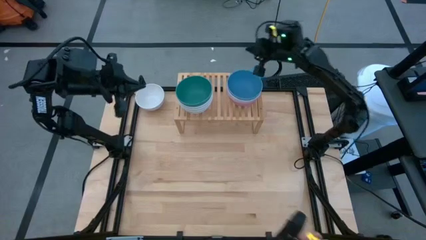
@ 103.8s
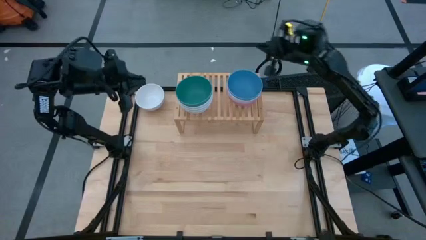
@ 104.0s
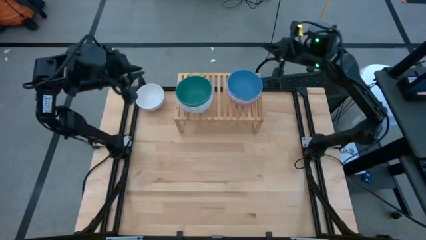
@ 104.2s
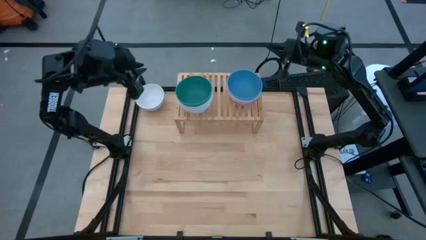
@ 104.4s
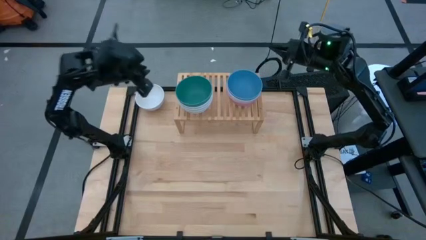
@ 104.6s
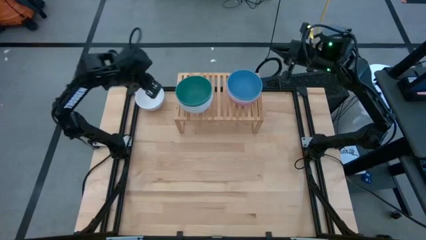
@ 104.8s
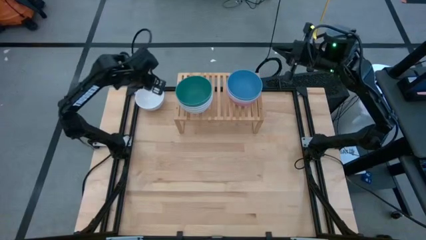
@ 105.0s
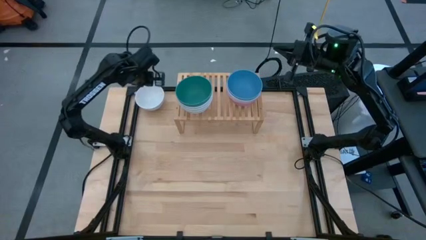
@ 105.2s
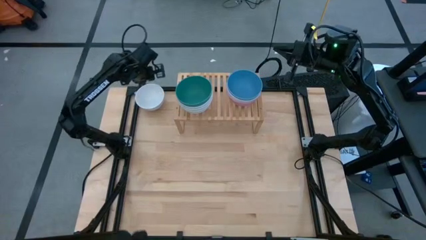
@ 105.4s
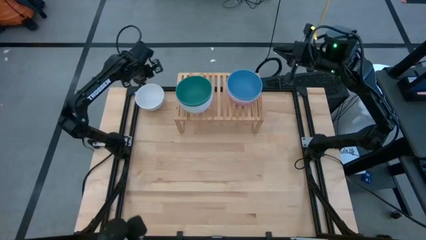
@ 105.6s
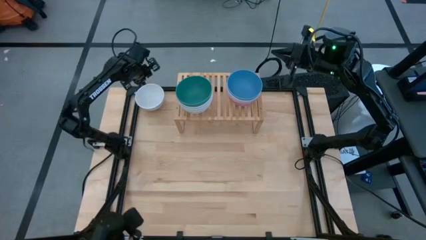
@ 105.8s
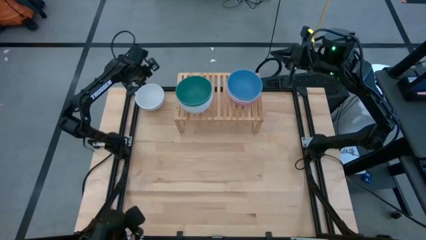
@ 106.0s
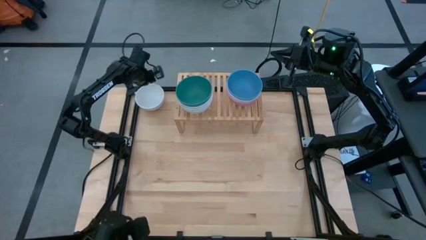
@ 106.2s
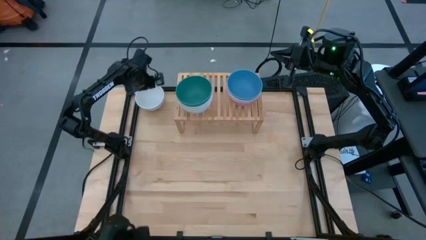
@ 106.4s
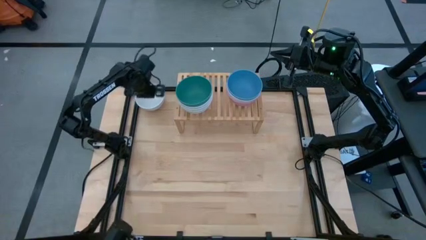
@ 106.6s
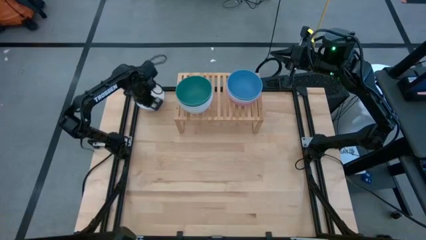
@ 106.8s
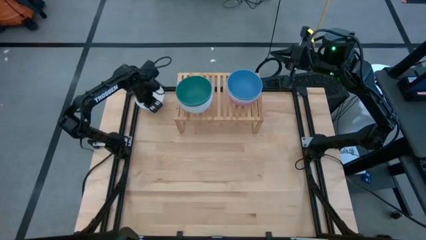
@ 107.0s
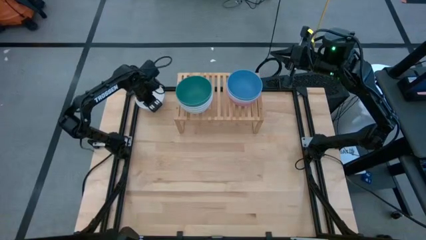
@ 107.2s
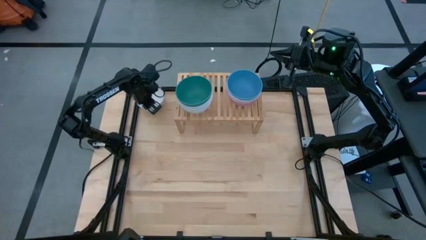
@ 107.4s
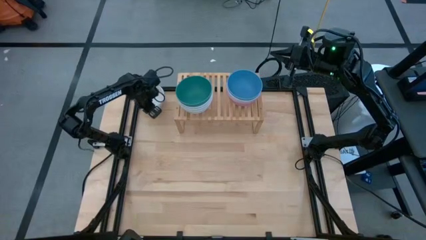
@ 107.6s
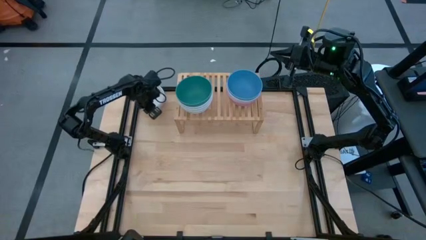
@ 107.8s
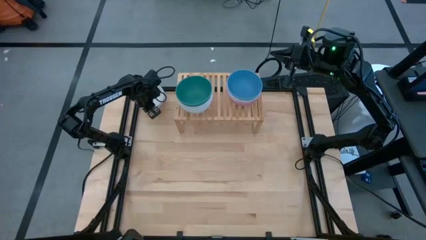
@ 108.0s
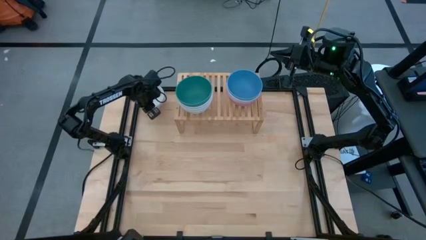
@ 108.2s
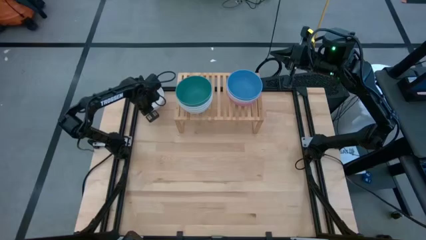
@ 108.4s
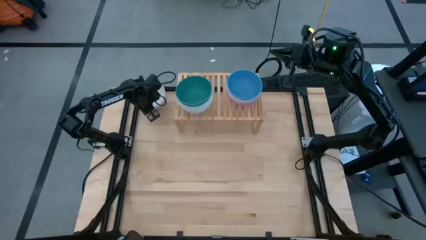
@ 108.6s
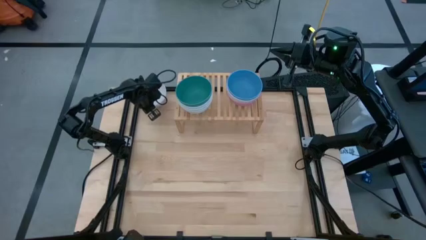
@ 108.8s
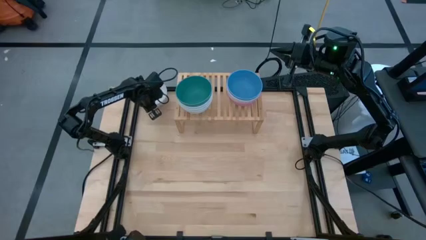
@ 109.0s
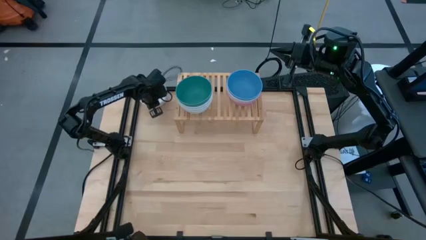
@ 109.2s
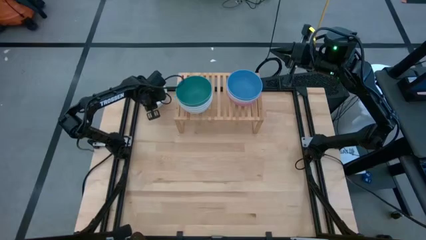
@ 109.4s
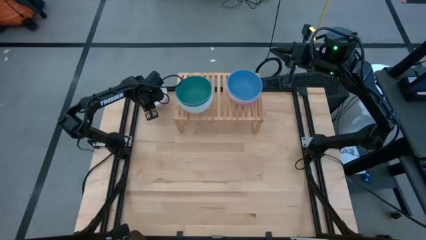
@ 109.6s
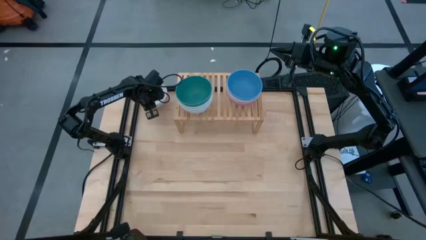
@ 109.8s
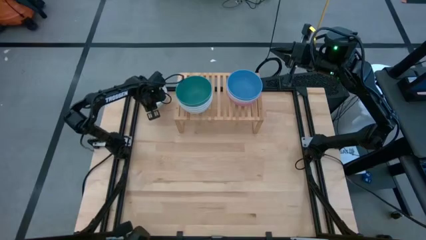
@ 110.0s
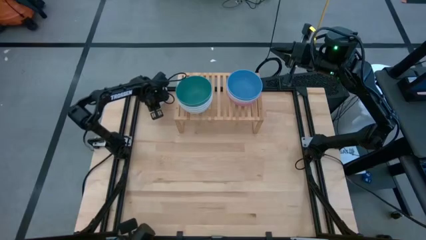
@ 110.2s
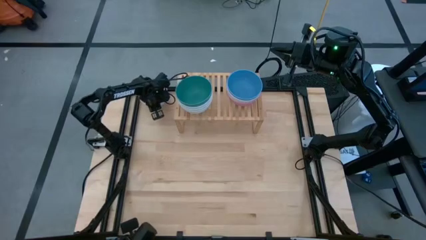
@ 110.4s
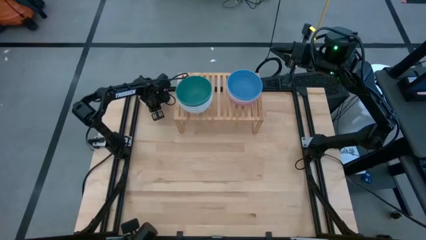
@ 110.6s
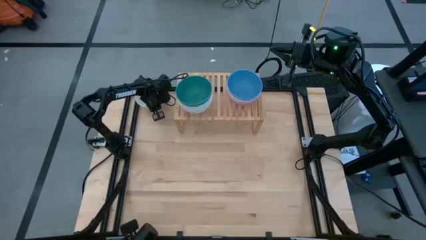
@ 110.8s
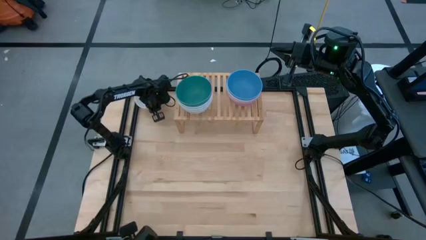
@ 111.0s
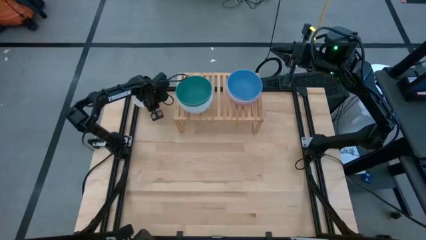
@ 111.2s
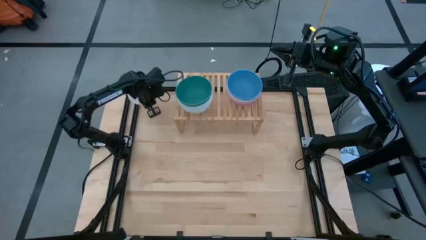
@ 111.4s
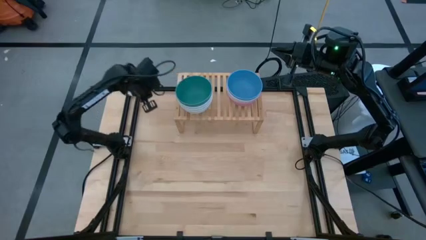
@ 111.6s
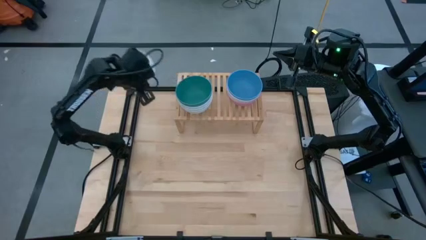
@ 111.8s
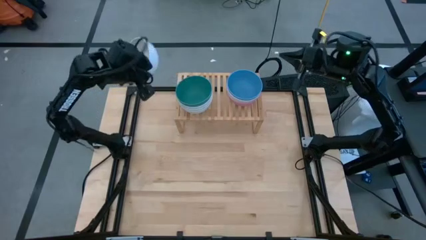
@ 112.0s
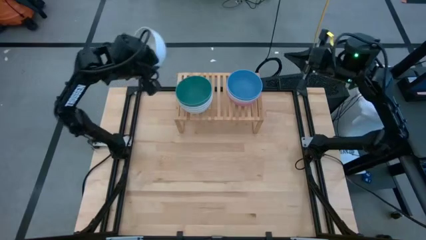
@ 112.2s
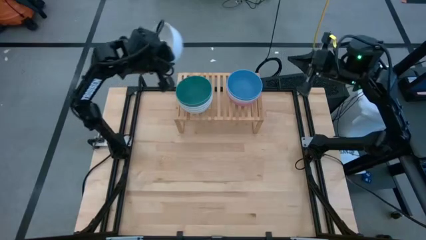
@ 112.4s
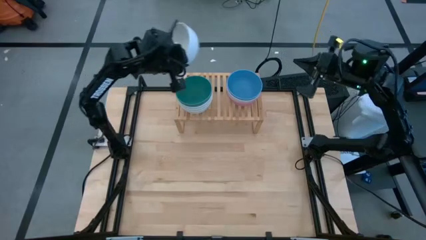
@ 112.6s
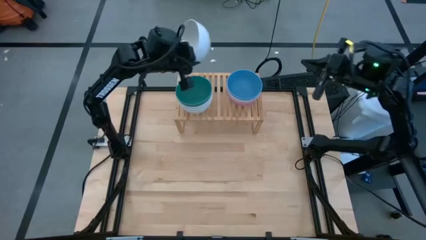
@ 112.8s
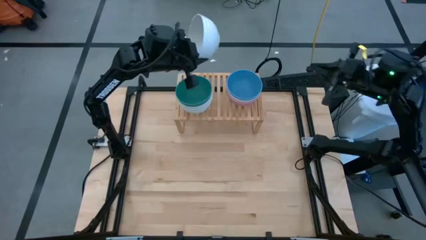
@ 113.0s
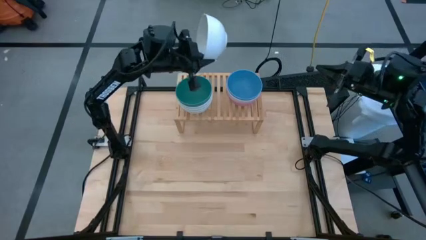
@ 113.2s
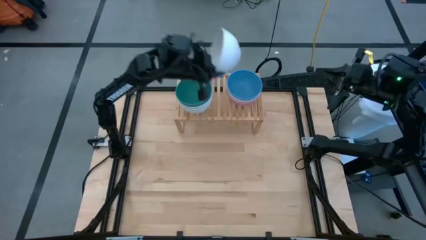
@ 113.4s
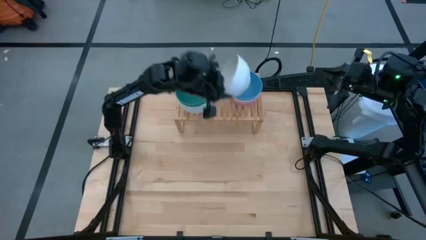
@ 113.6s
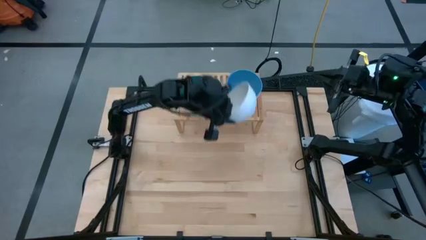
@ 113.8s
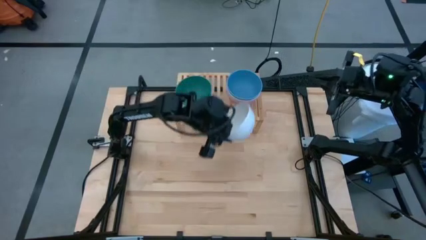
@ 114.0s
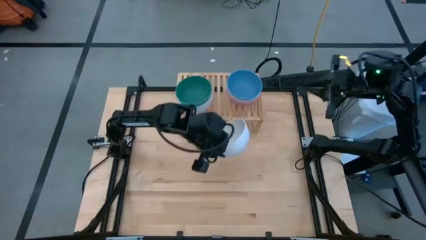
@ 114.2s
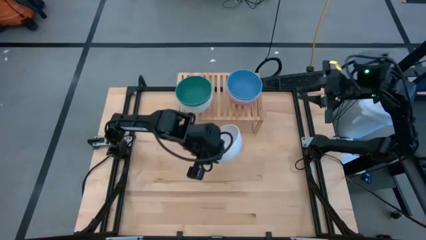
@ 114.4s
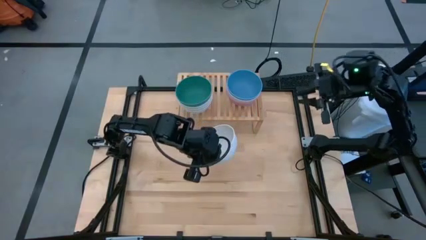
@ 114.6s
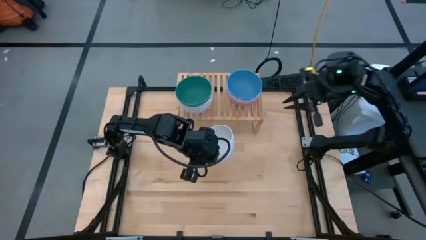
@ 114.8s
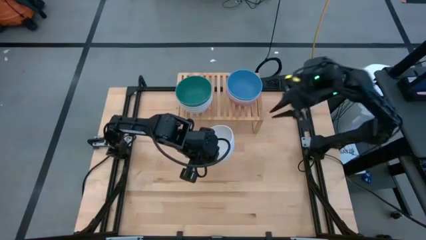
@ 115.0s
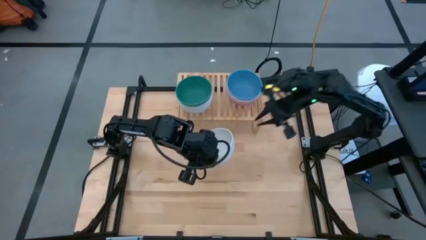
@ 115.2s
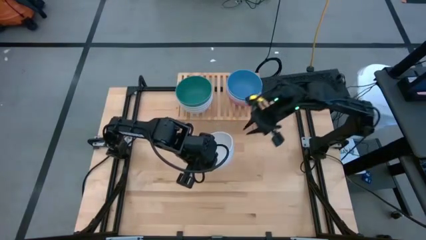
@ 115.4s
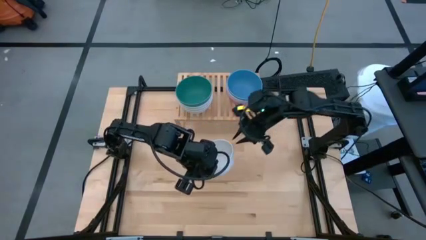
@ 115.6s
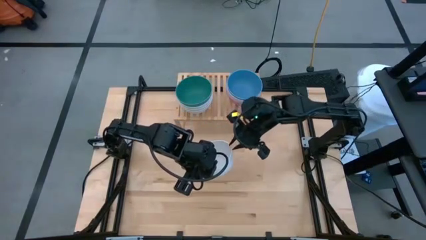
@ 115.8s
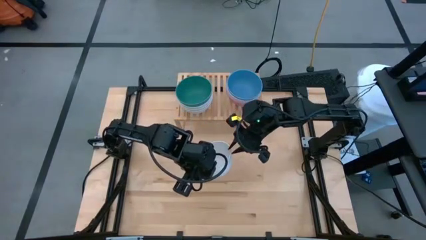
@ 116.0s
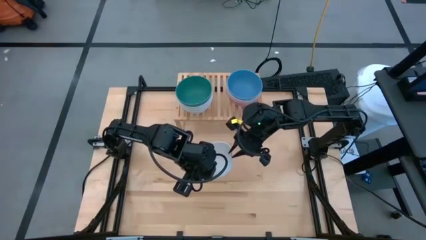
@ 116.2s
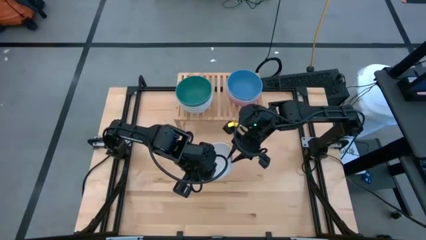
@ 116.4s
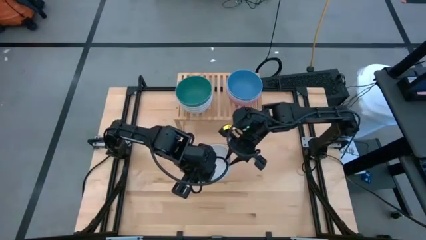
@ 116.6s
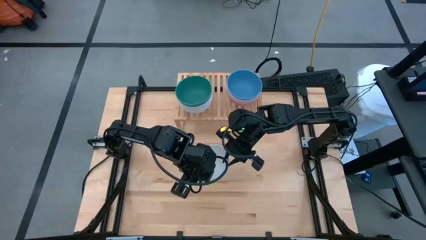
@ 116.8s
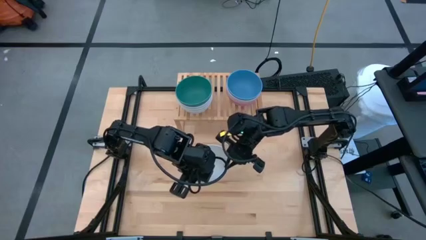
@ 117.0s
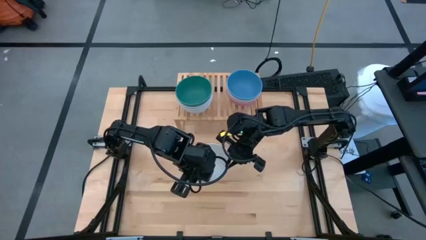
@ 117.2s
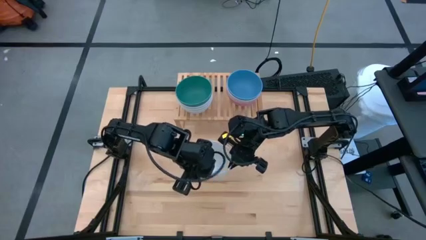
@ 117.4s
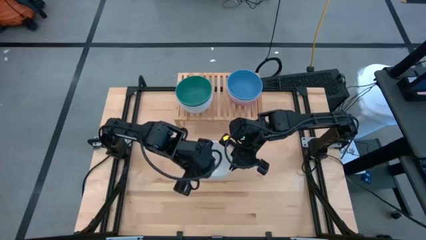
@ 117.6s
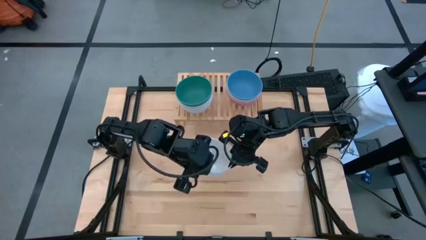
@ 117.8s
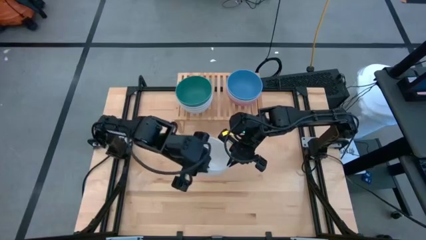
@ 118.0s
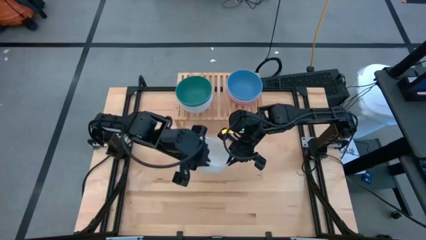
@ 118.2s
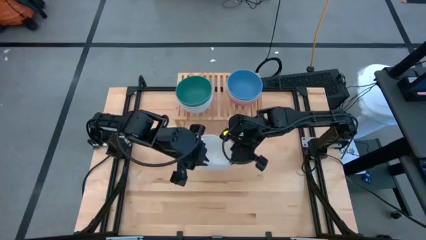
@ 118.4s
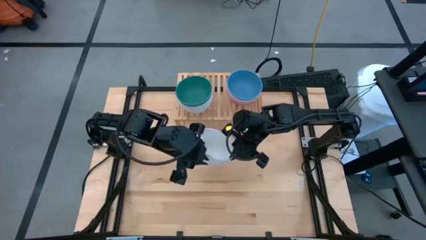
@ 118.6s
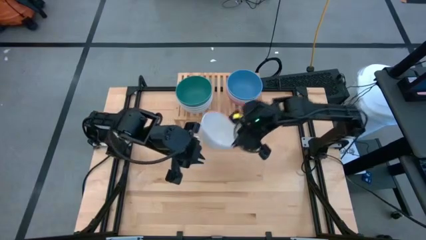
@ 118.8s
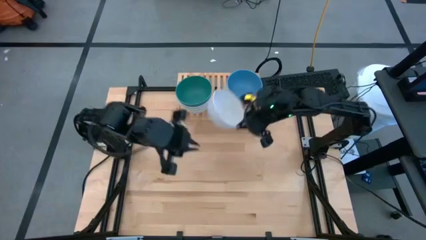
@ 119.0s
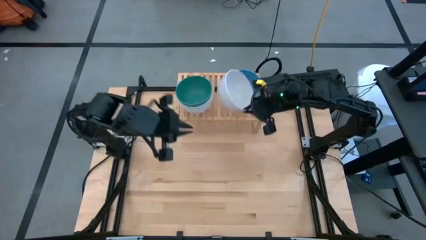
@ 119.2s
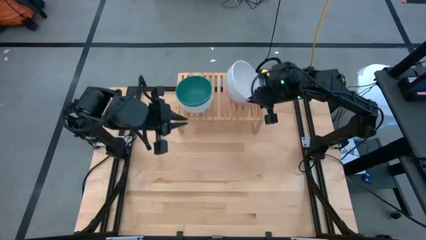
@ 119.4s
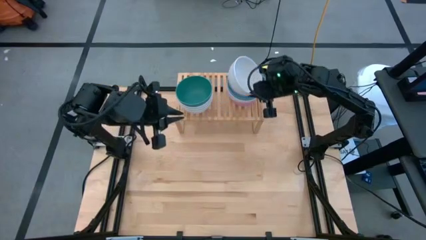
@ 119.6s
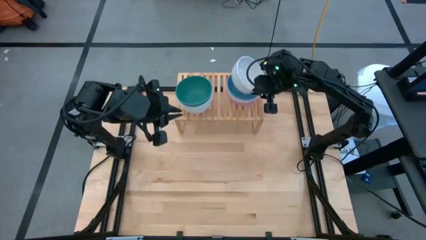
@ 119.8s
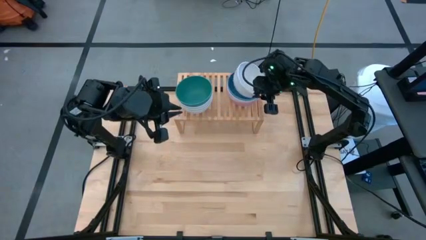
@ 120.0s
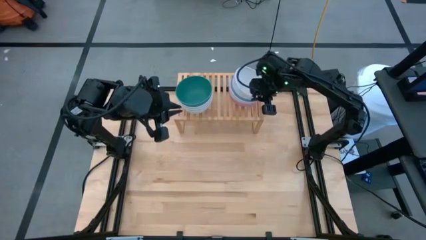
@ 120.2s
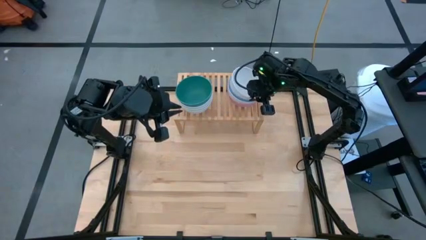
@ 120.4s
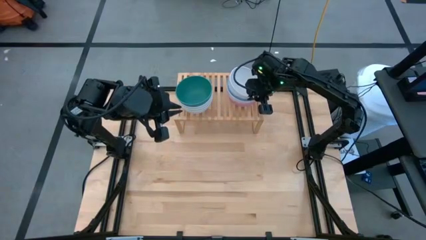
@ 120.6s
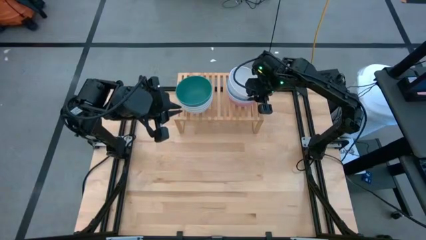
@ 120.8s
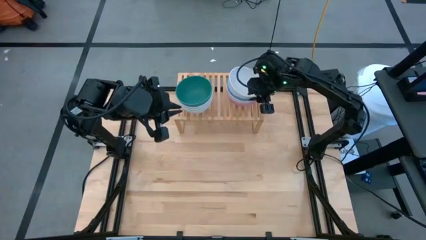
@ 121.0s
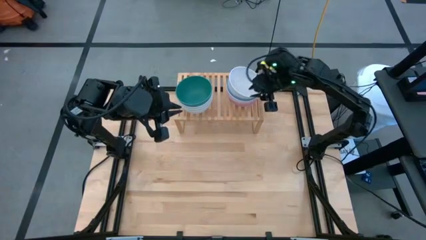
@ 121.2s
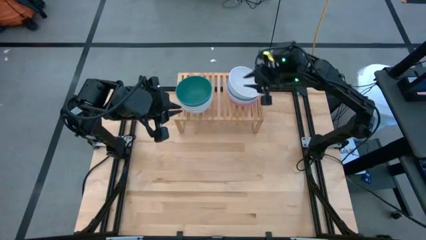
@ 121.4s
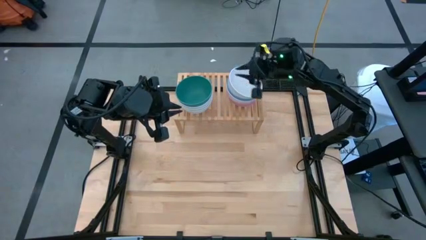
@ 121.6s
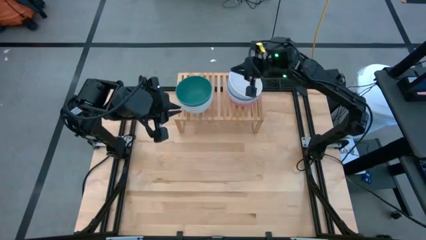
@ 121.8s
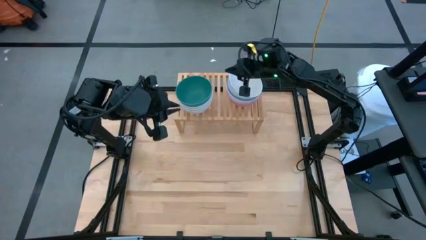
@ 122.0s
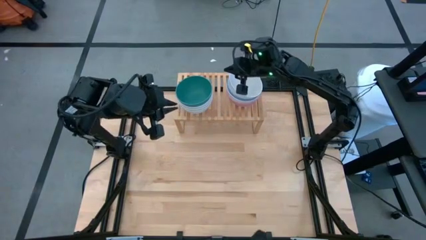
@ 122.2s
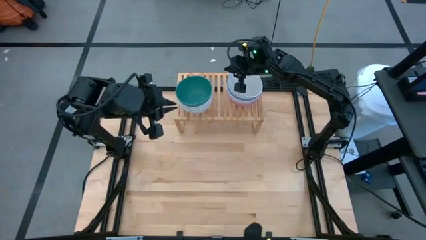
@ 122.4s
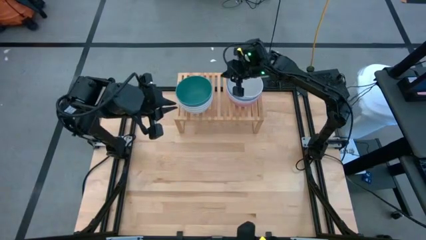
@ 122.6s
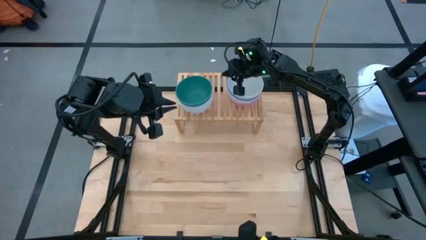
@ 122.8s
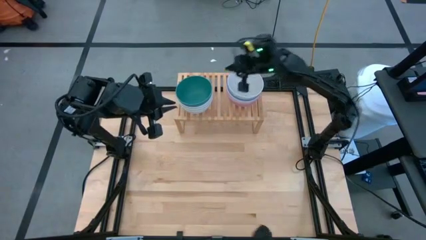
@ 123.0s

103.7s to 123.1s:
Task: Place and stack bowls onto a shelf
Stack the white bowl on top of the blue bowl on the shelf
